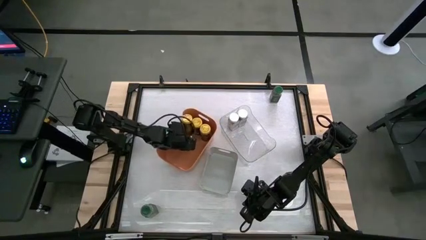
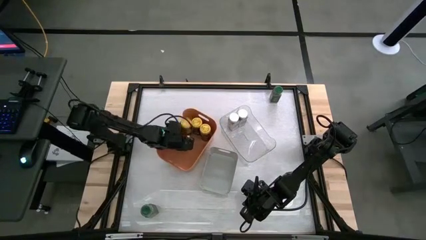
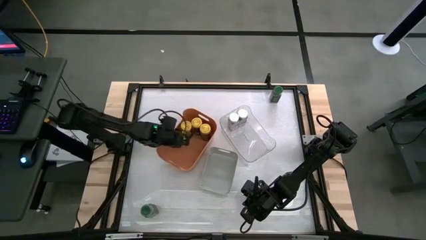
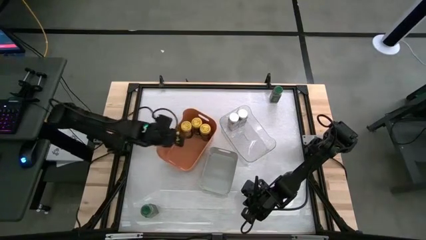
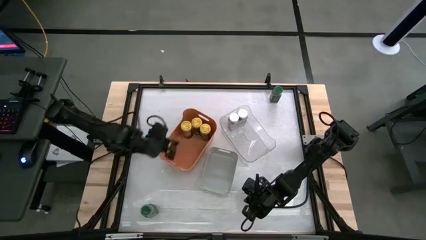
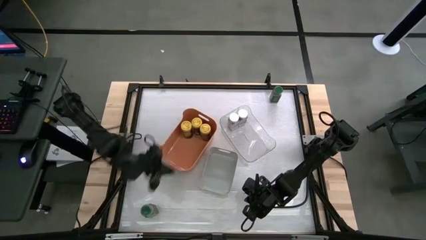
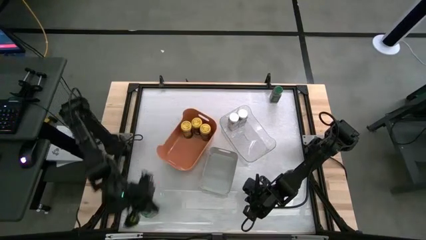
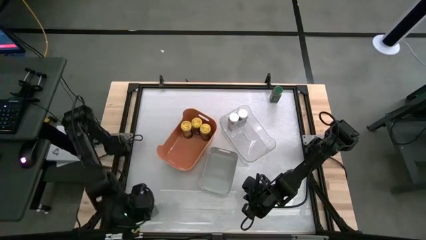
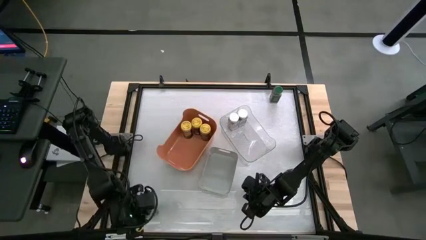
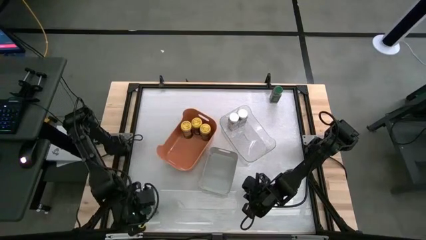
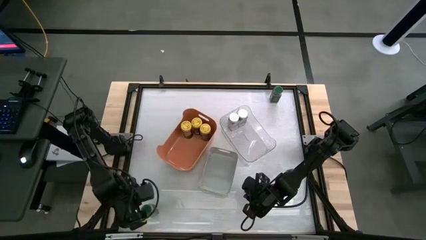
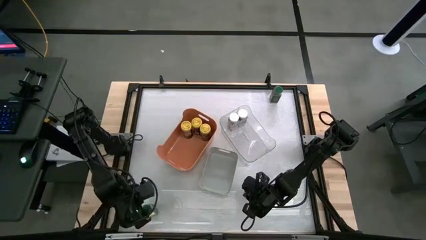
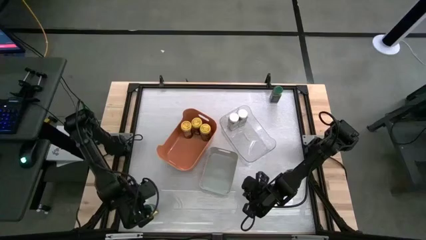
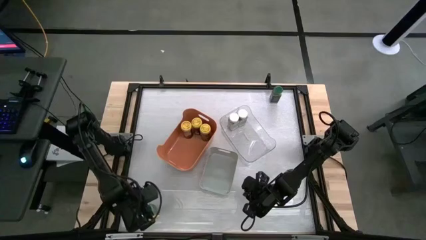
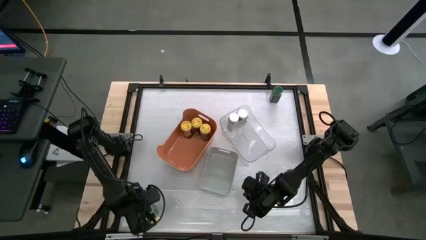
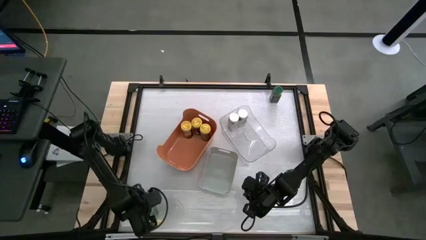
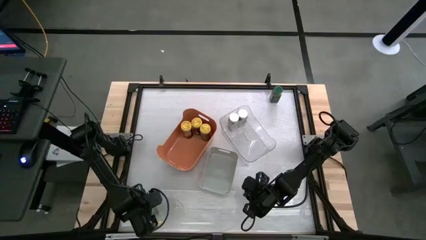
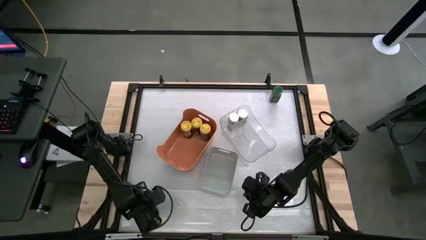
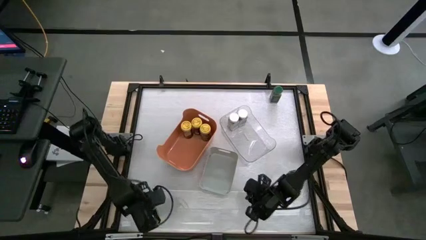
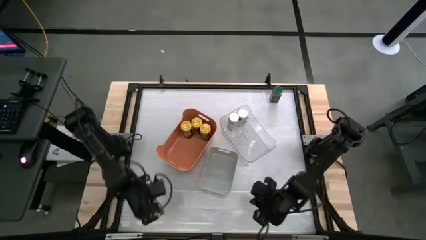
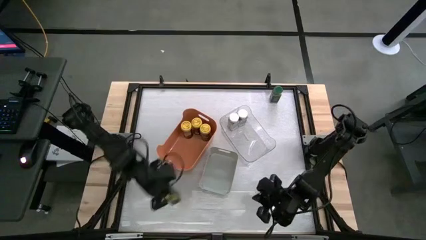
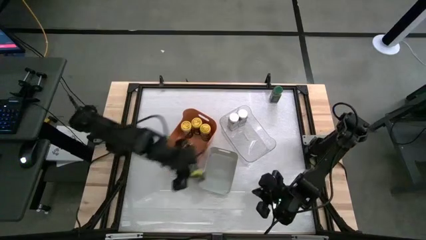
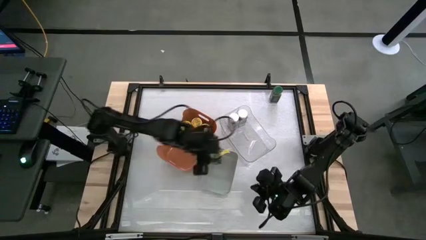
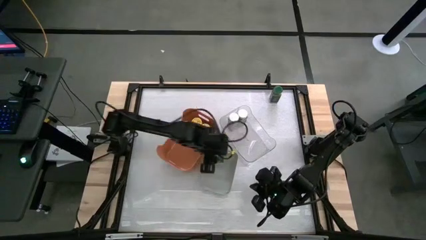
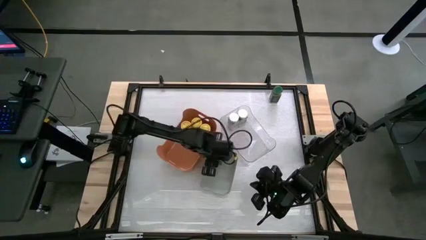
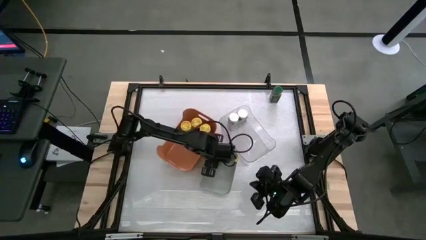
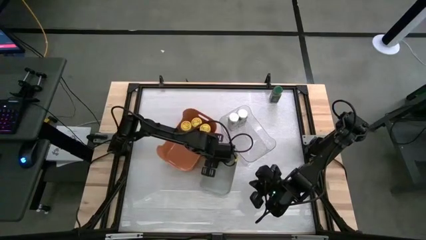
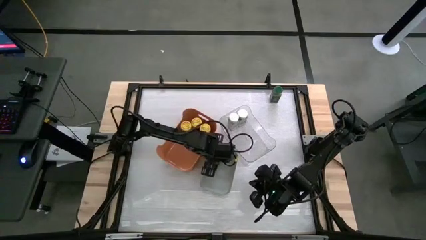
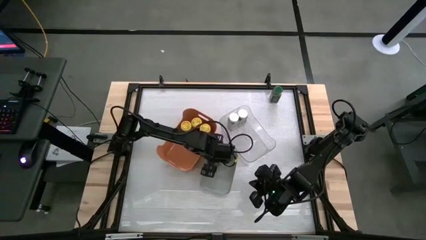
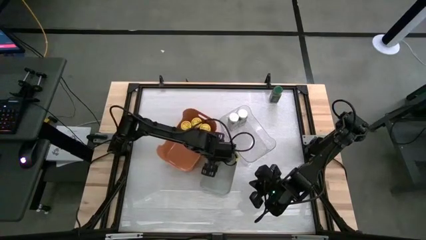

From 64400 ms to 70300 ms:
Task: Sort spices by type
Put the bottom green seasoning bottle into the gray bin

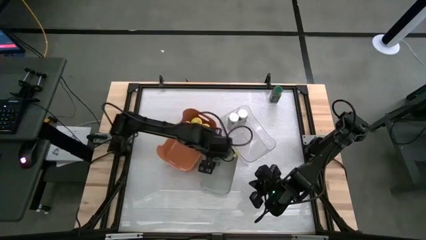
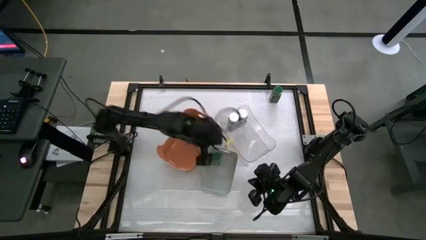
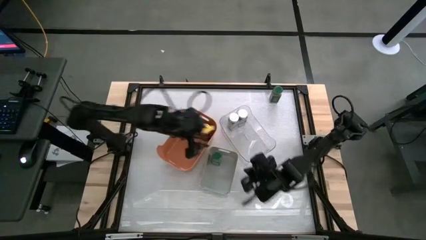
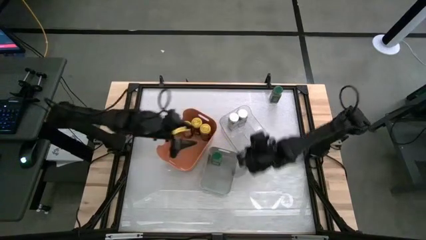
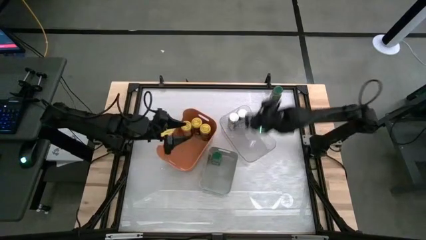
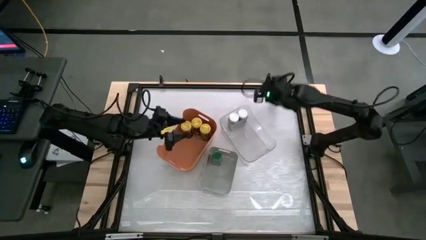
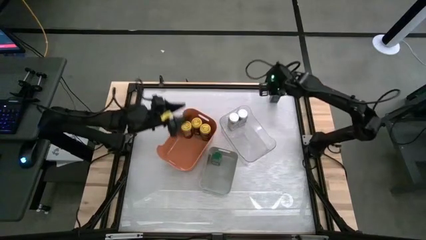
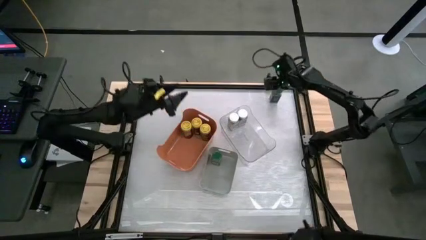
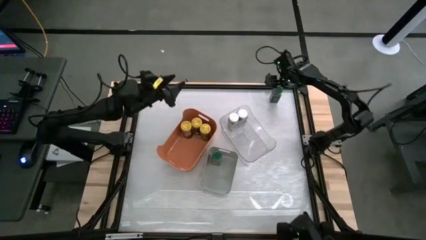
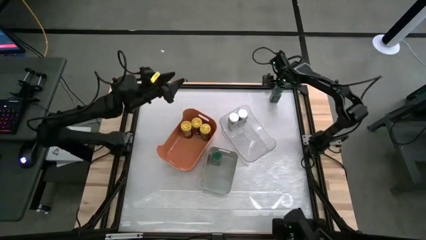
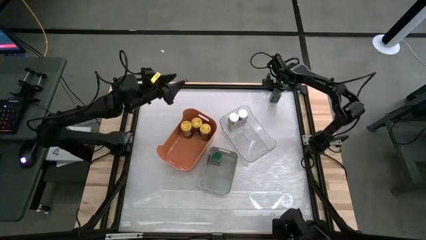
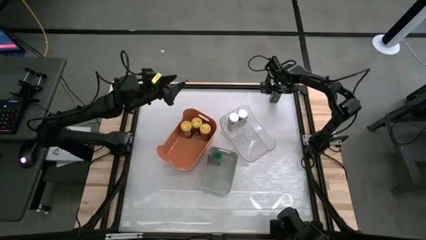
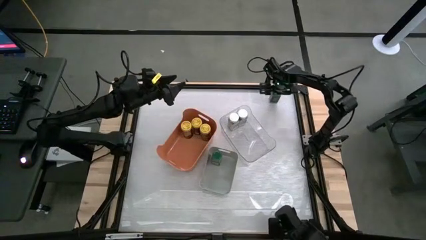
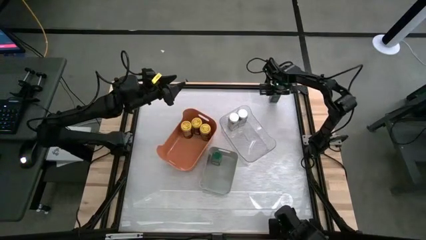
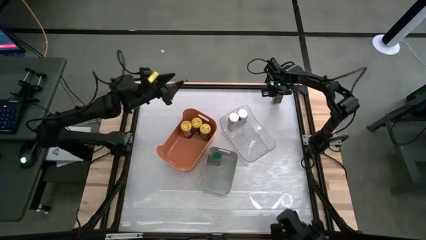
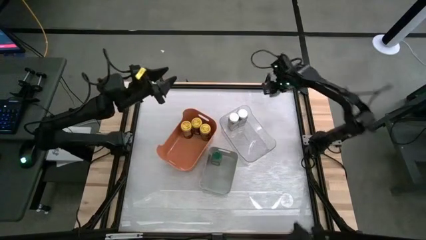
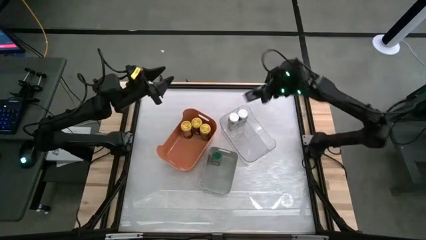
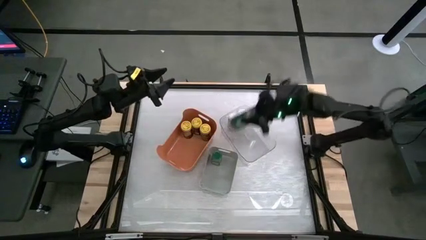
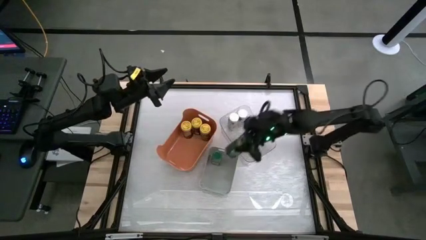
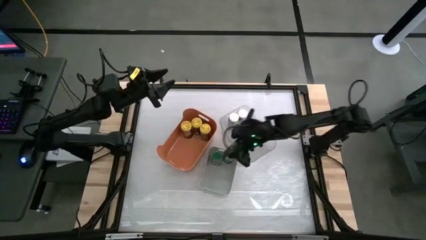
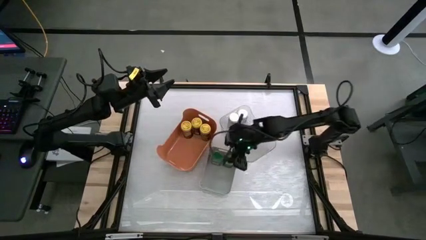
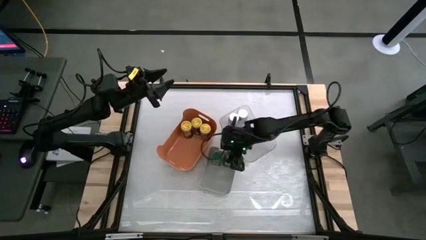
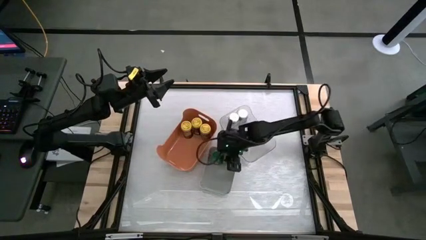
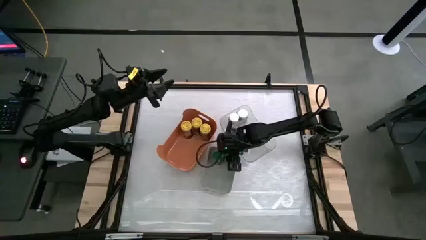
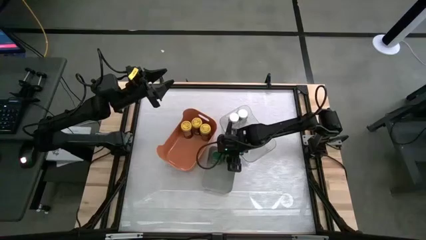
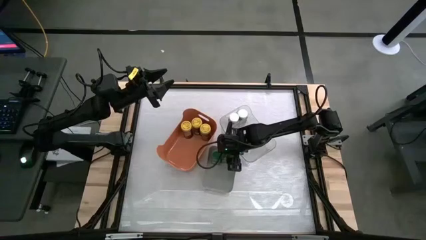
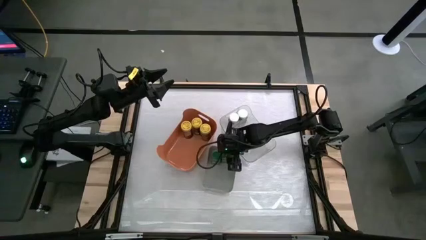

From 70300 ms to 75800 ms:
Put the green seasoning bottle into the gray bin
